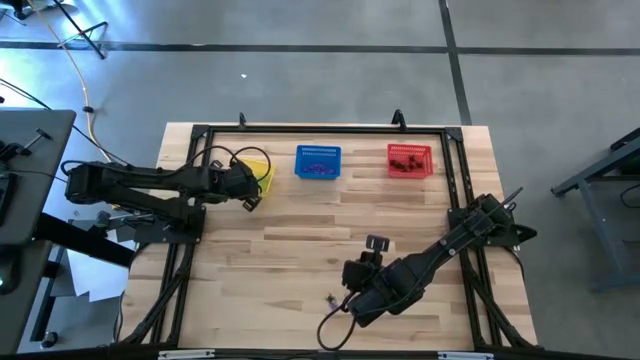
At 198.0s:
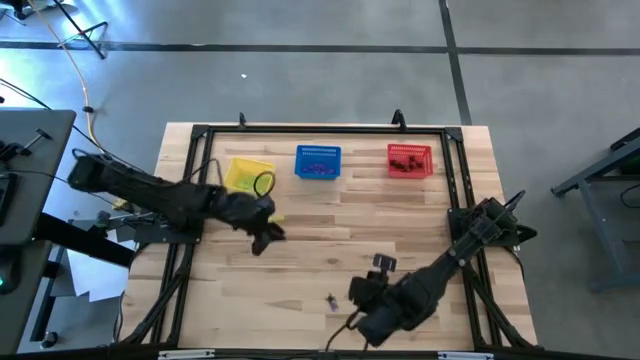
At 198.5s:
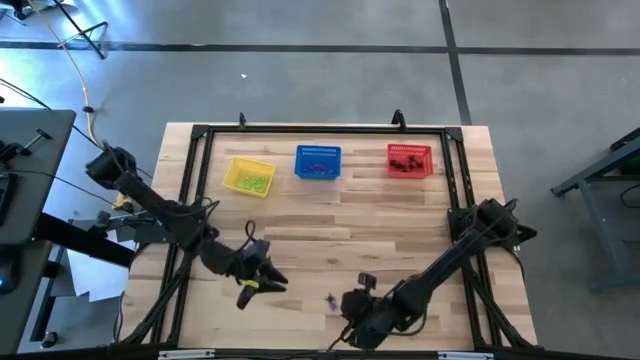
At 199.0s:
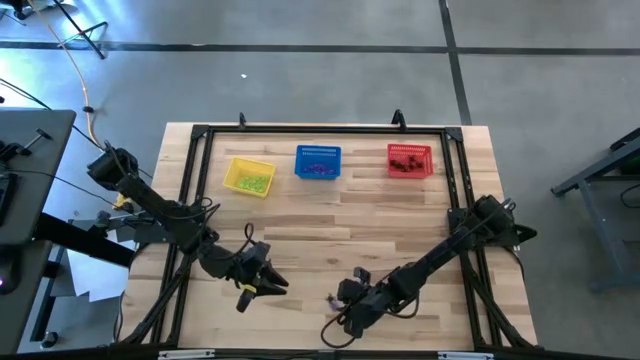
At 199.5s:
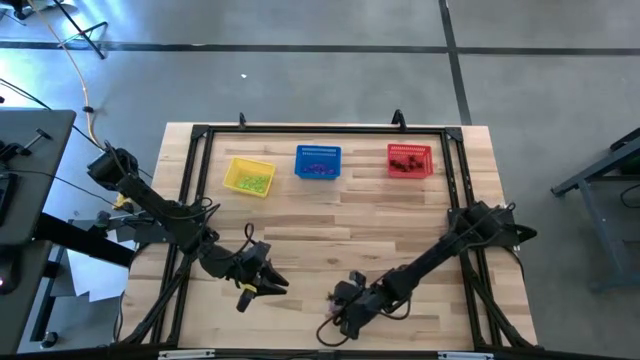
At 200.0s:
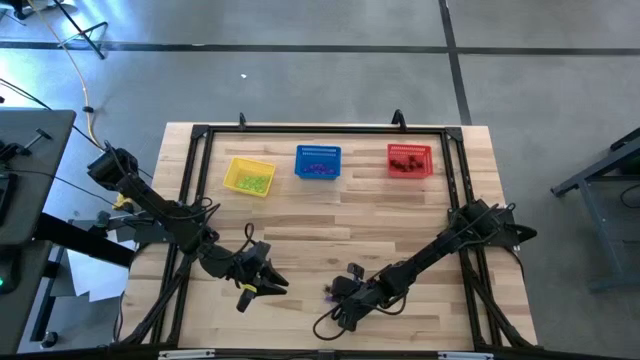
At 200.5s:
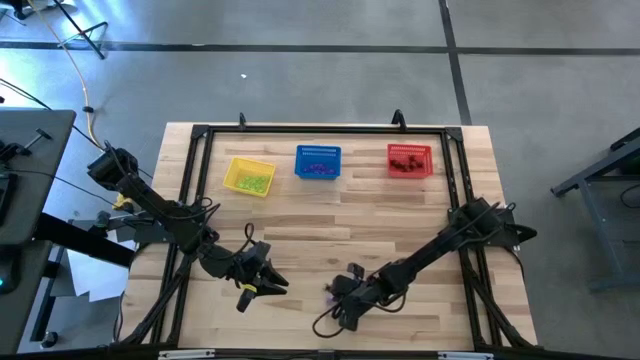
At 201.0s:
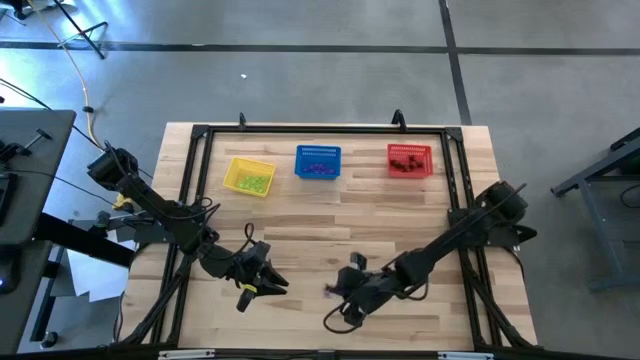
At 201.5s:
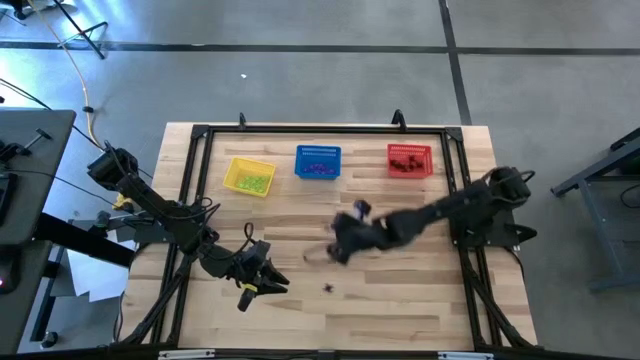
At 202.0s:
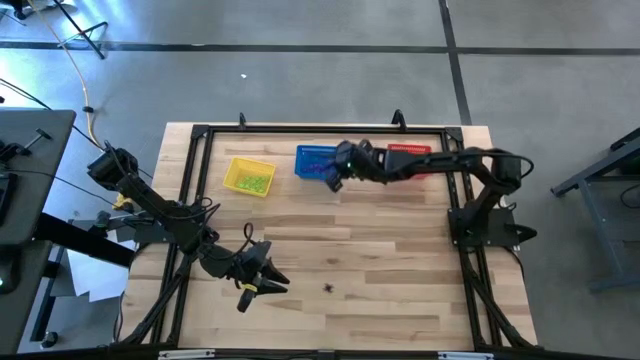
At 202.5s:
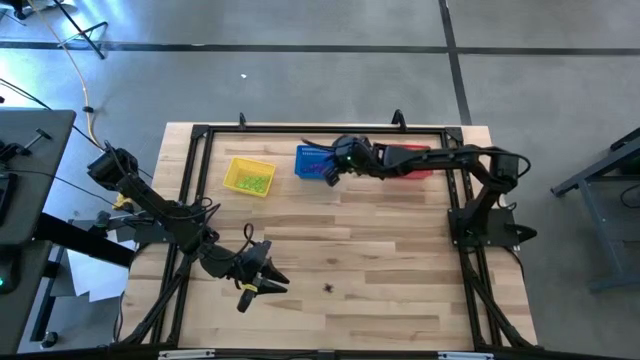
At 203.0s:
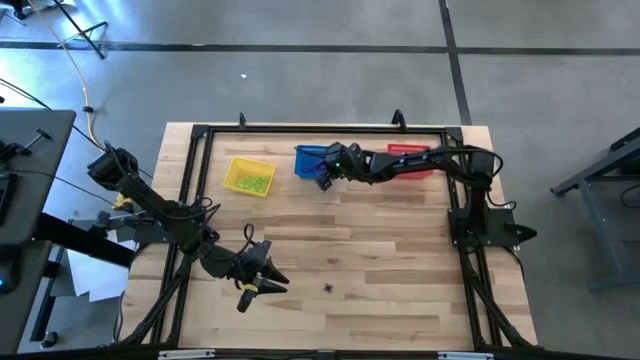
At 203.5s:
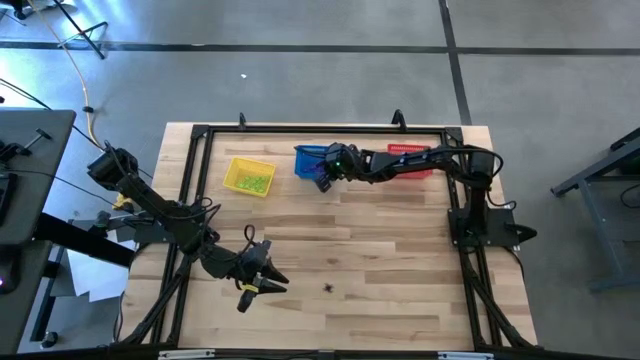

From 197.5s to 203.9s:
Task: Sort Halloween decoration
Put the purple spider toy into the blue bin

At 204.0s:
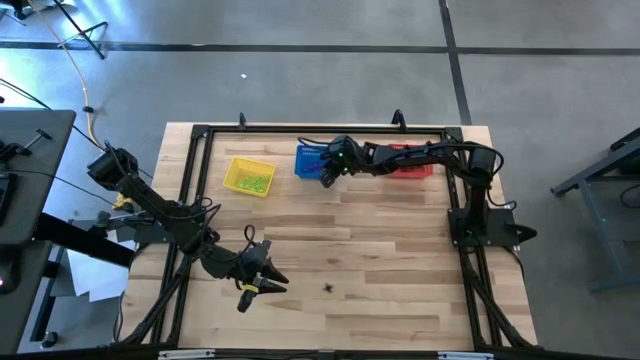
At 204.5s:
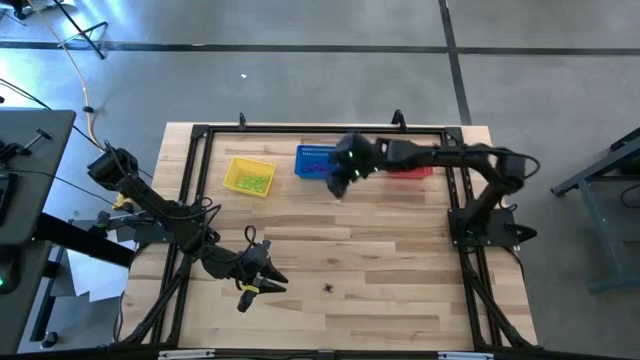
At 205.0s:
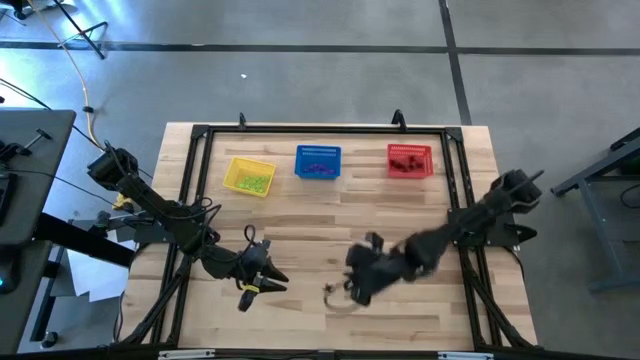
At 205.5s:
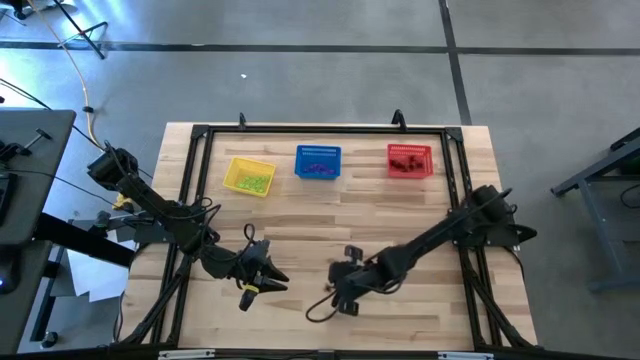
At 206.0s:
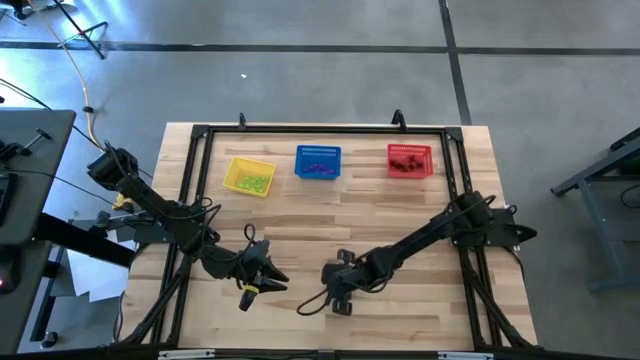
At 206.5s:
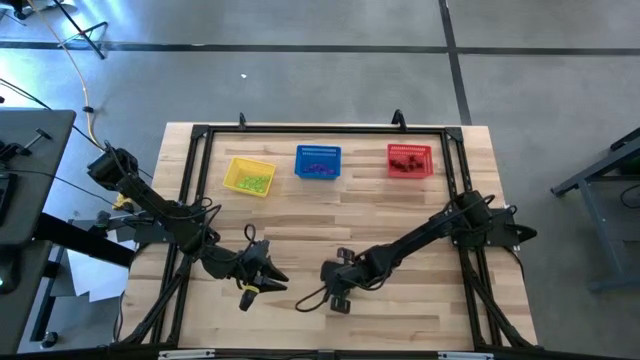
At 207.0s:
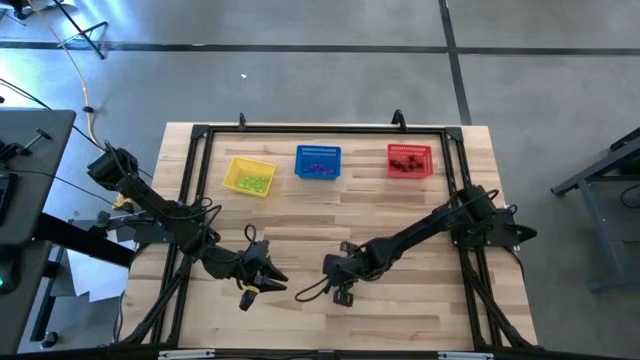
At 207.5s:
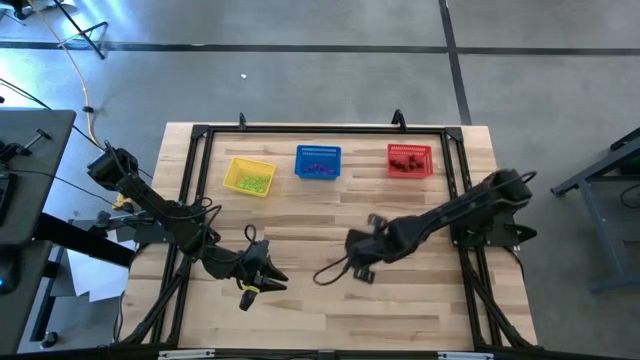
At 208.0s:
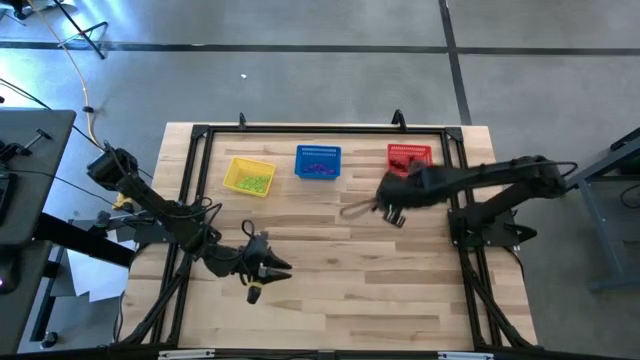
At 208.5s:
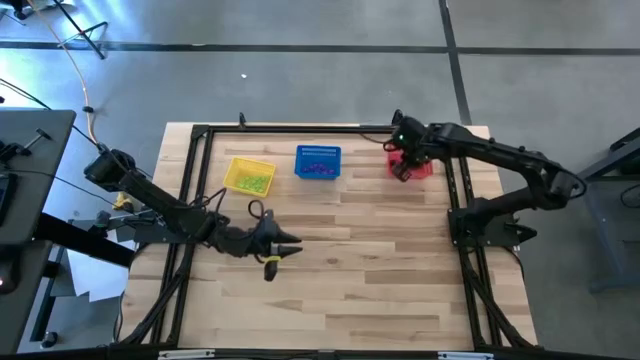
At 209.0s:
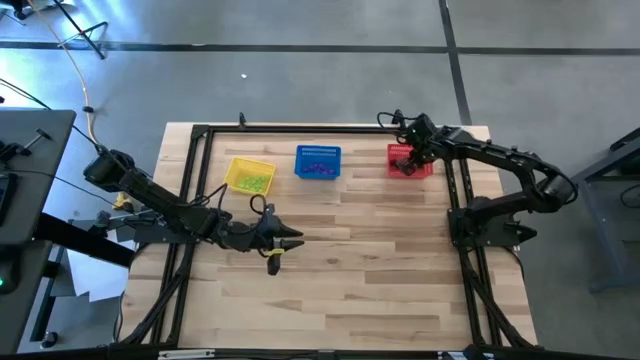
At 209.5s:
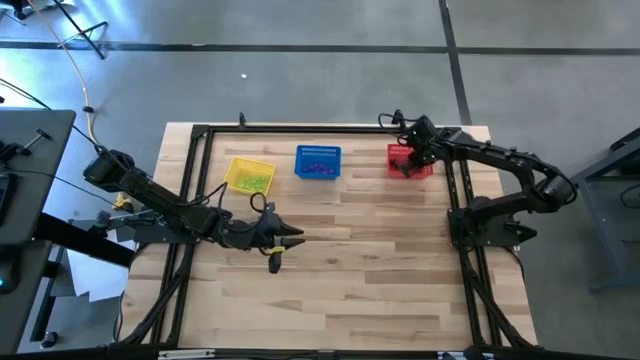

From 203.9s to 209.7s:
Put the black spider toy into the red bin

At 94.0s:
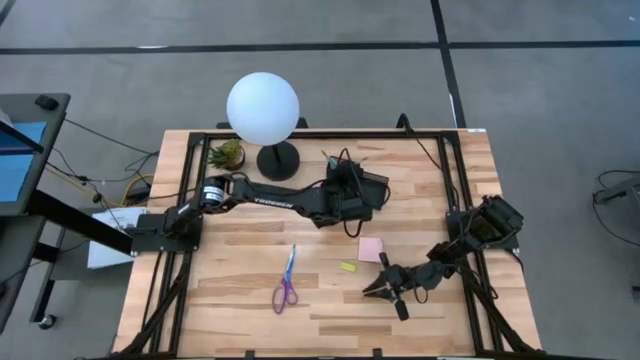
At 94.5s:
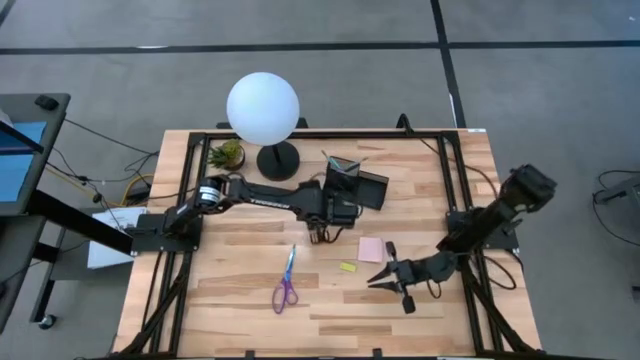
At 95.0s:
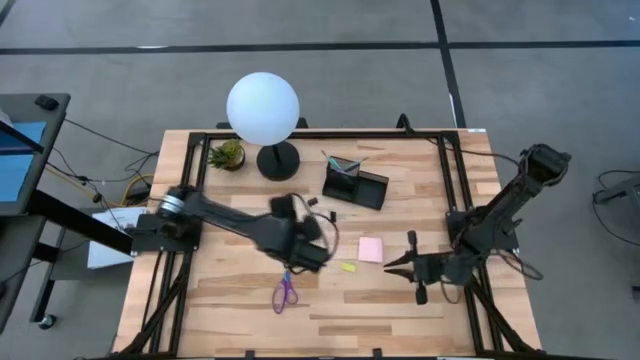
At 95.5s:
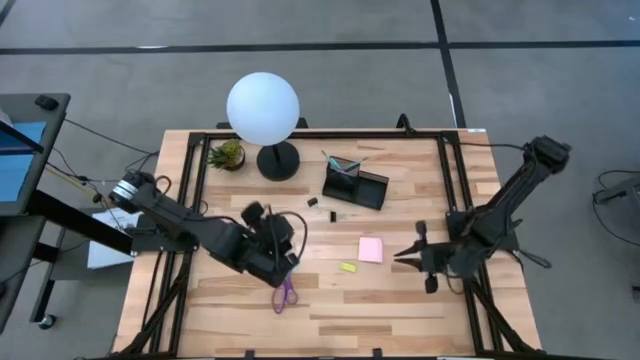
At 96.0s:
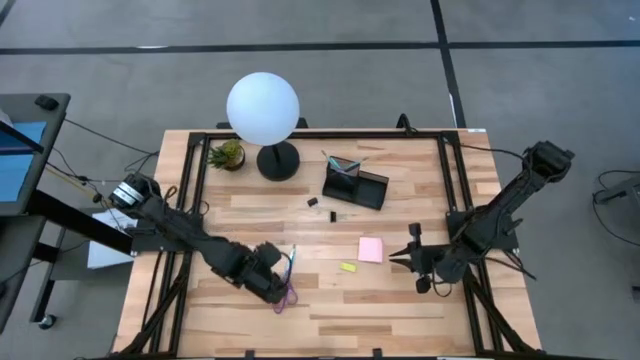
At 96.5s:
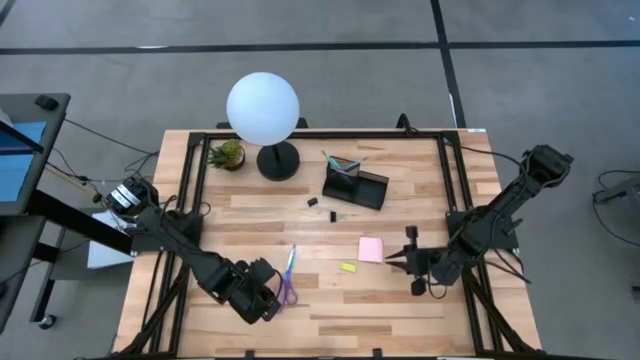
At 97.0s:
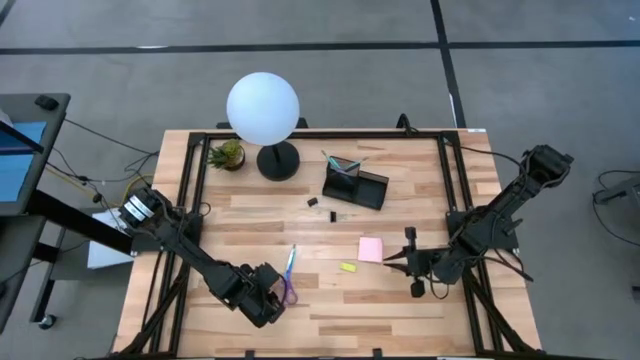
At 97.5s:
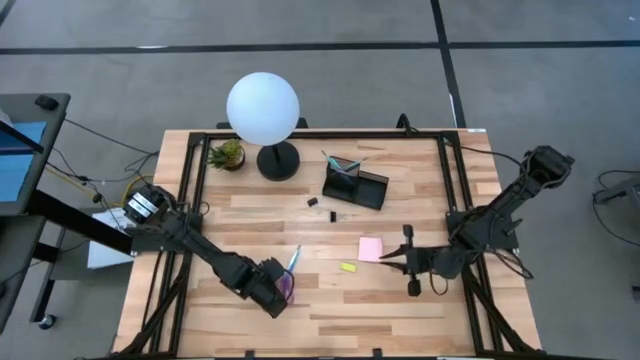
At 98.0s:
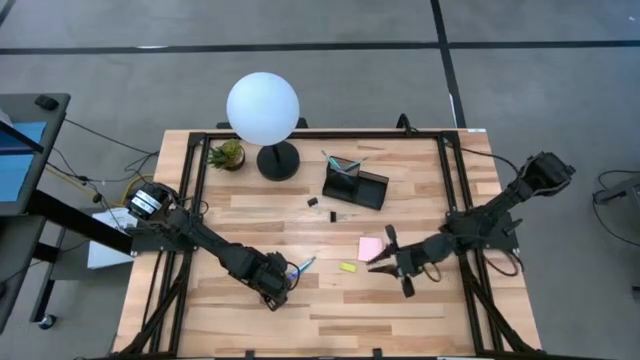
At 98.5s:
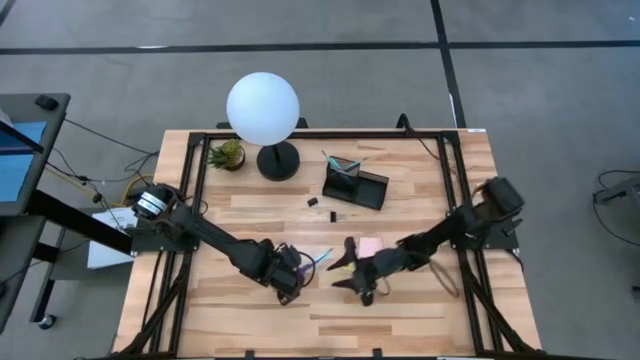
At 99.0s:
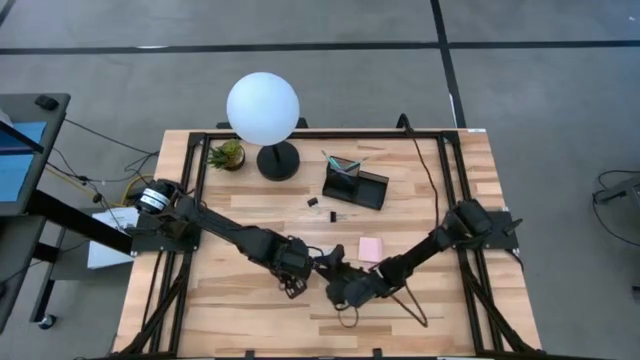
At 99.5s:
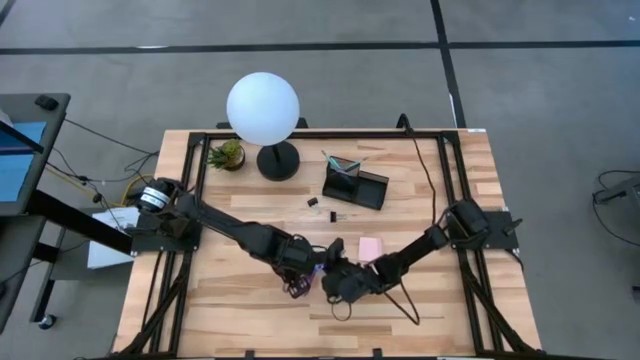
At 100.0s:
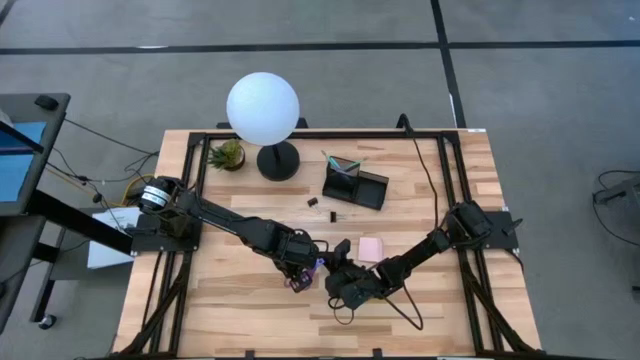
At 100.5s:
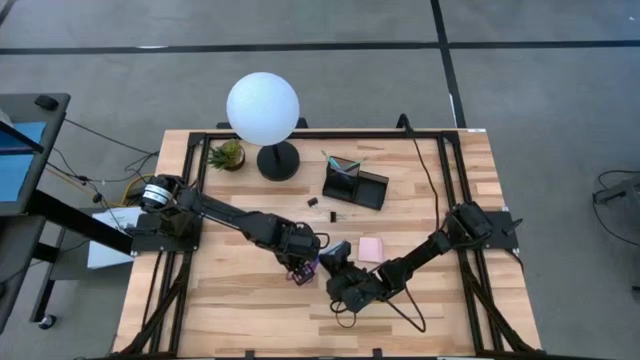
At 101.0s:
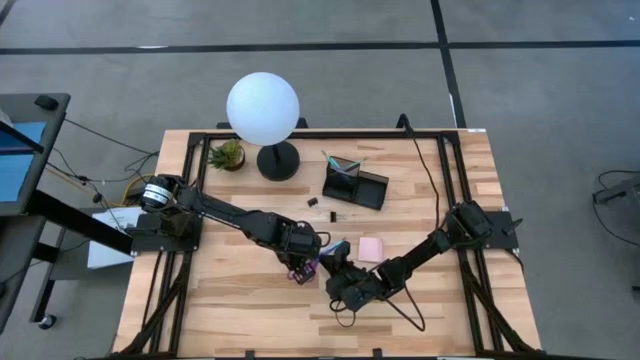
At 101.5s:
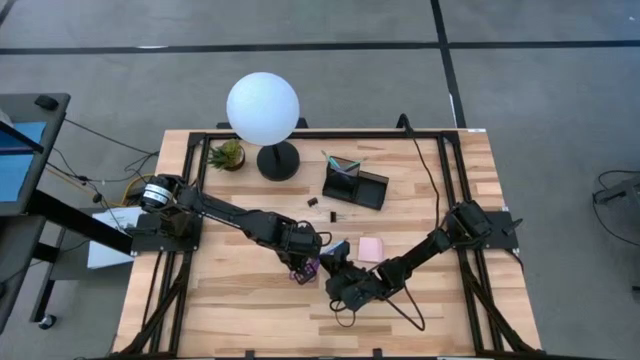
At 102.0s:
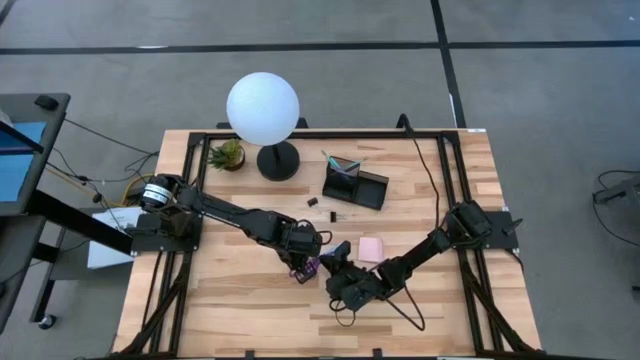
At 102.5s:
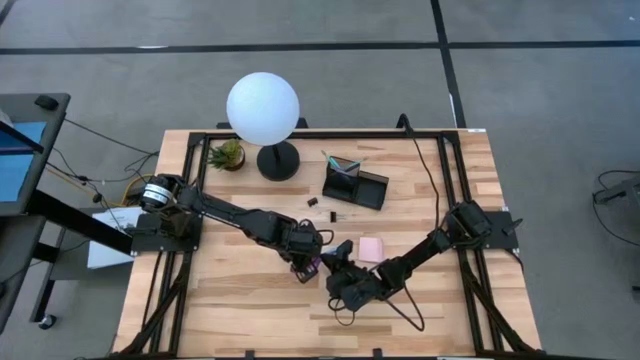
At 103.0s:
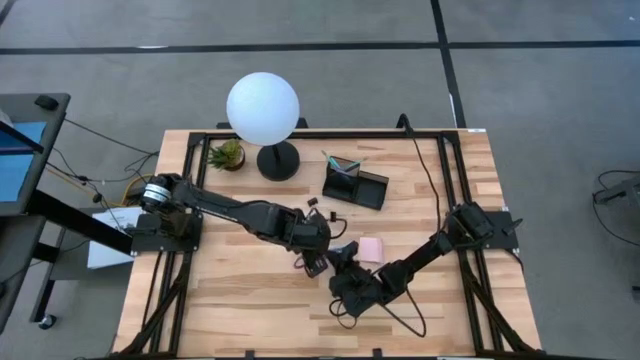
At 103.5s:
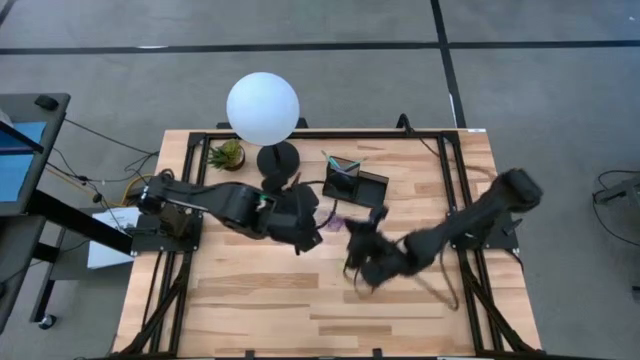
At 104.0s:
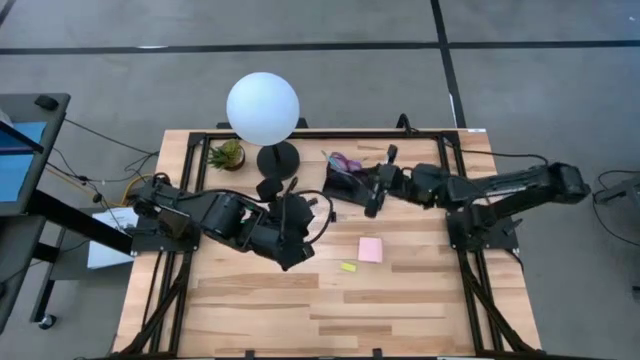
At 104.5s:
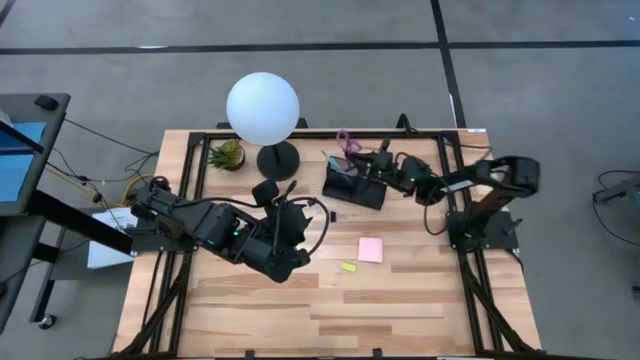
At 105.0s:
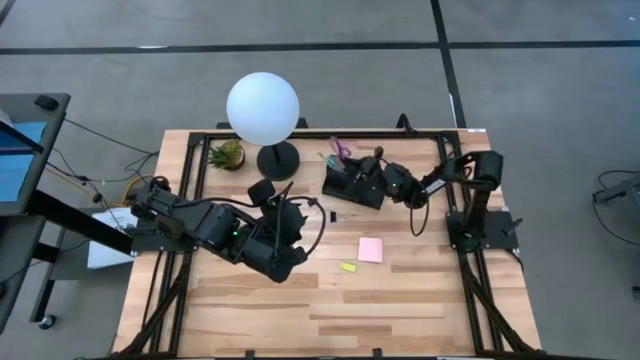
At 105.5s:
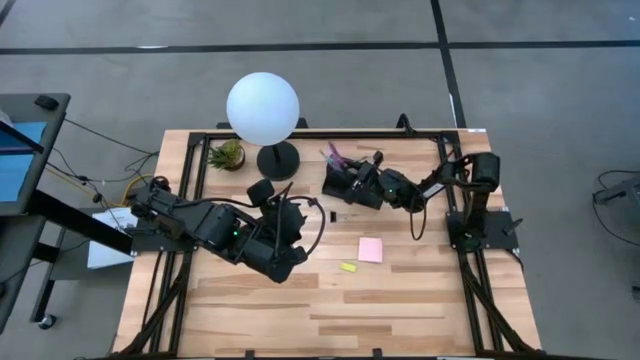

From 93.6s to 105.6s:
Task: Pick and place office supplies into organizer
Put the purple scissors into the black desk organizer
